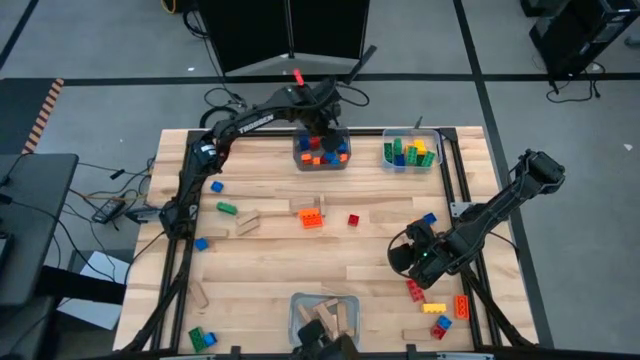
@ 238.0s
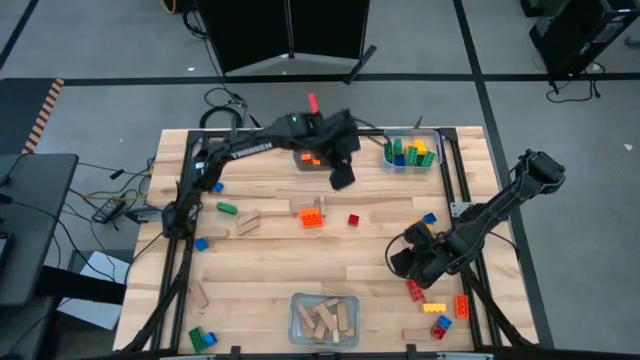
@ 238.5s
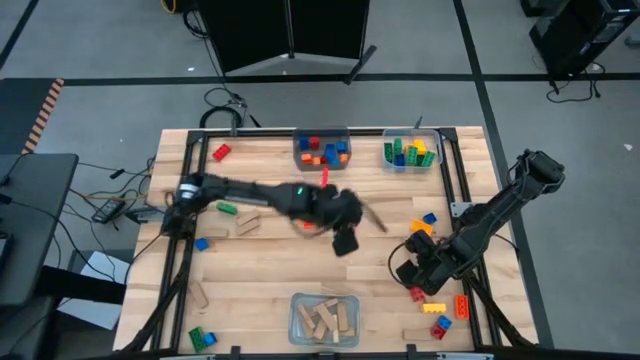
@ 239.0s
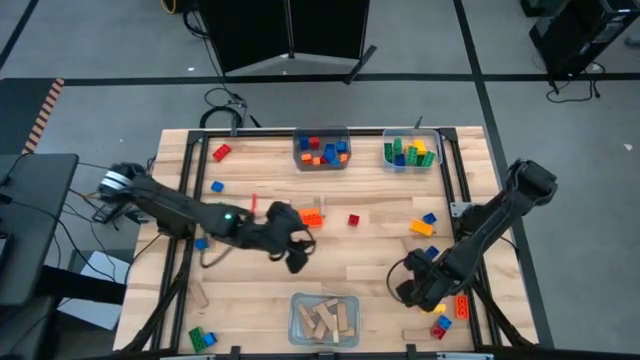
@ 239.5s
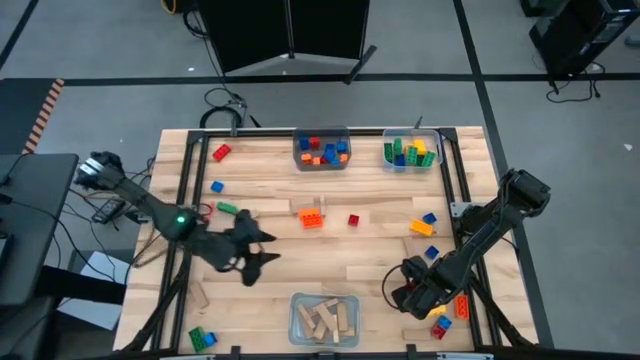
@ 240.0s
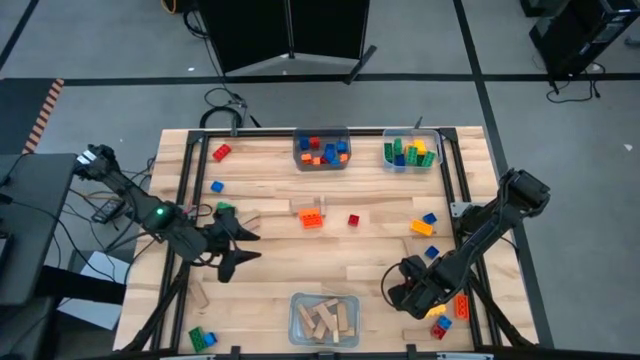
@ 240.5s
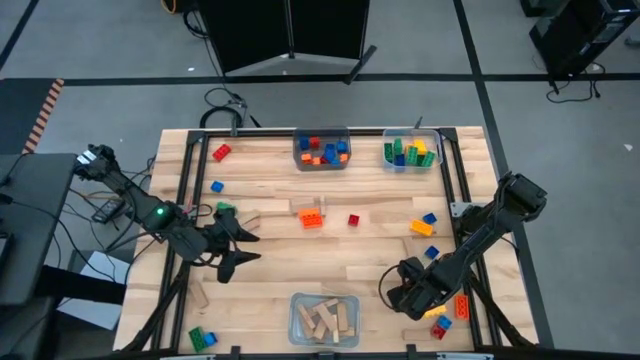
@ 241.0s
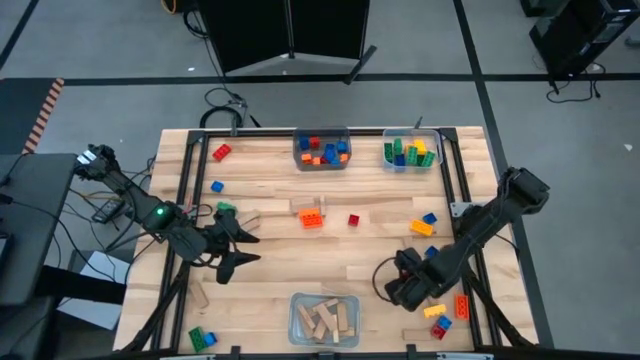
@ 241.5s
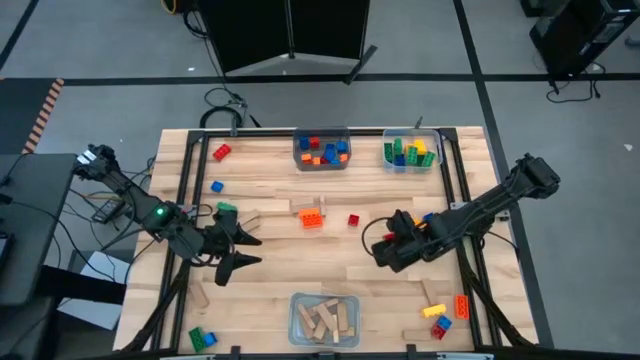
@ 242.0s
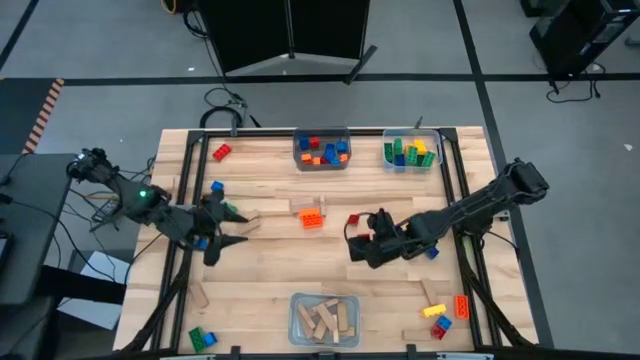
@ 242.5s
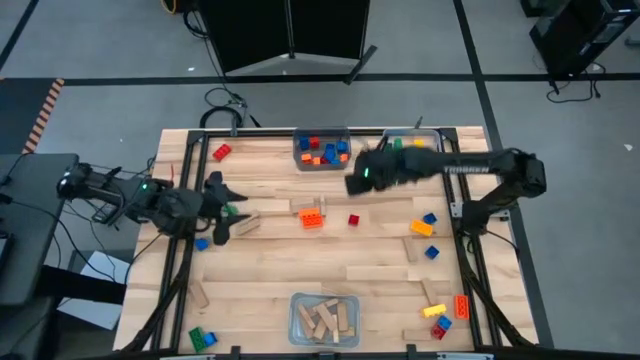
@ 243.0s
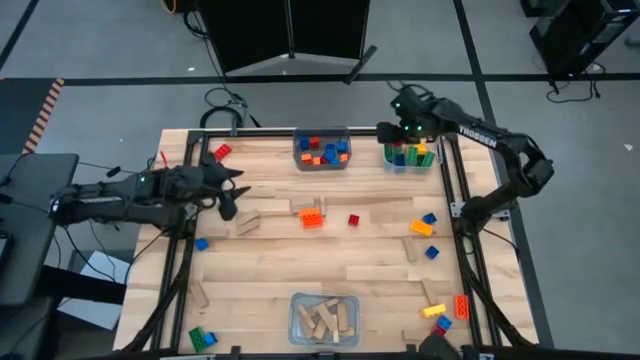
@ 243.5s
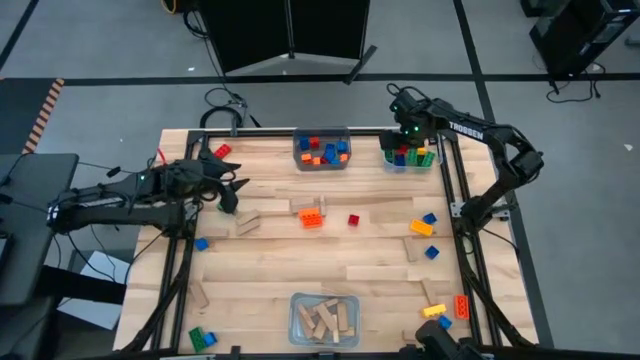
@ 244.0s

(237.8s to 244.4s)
Task: Sort blocks by size
Put the large red game piece into the transparent bin

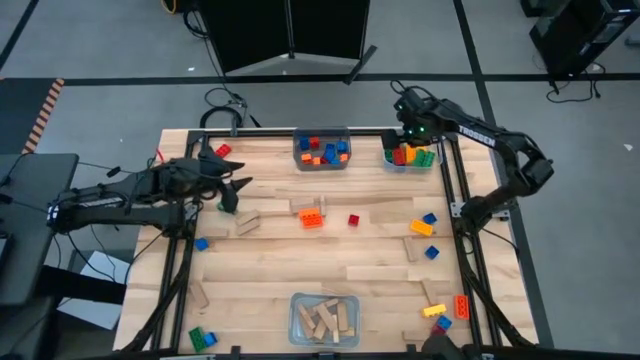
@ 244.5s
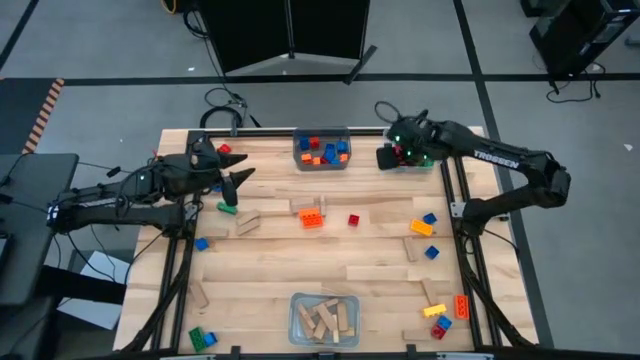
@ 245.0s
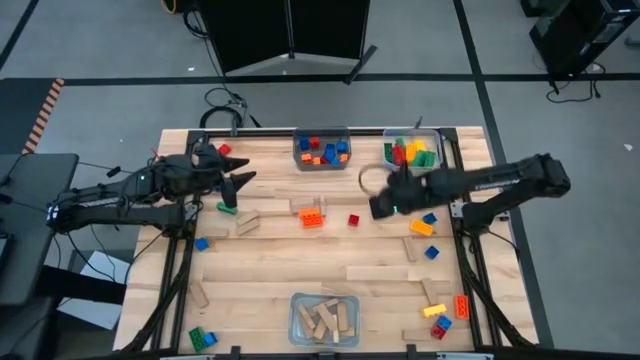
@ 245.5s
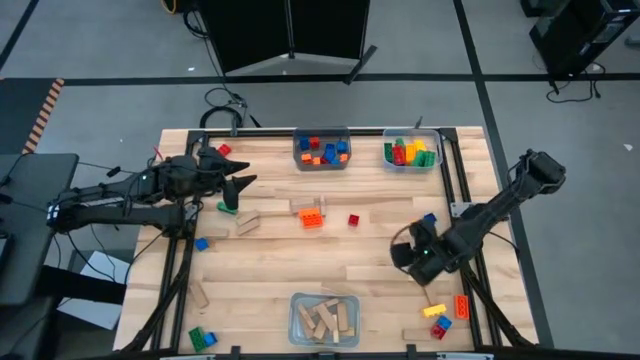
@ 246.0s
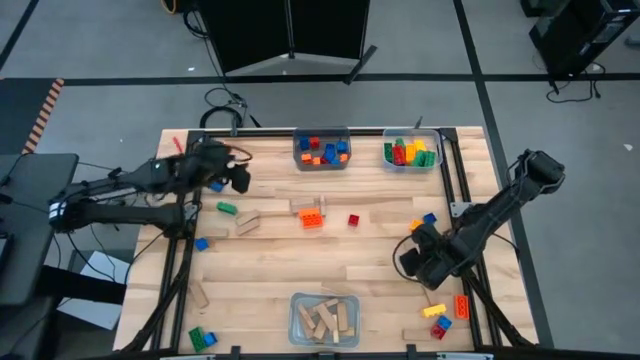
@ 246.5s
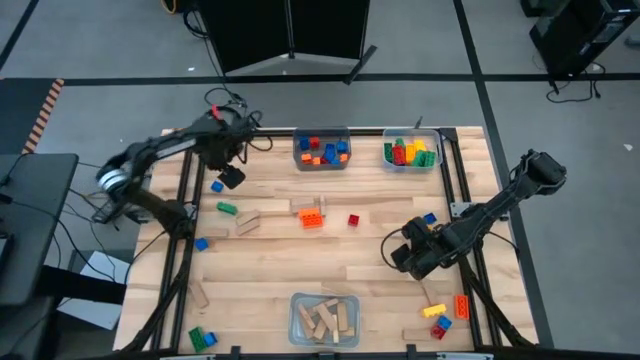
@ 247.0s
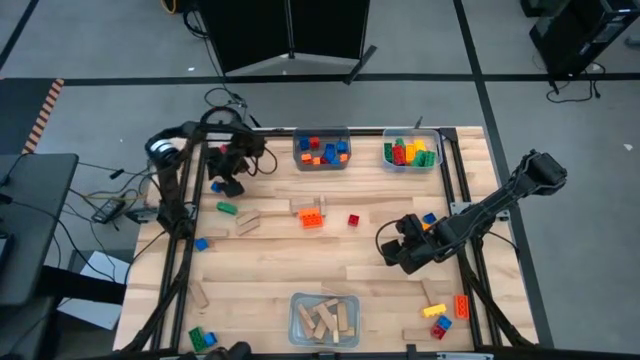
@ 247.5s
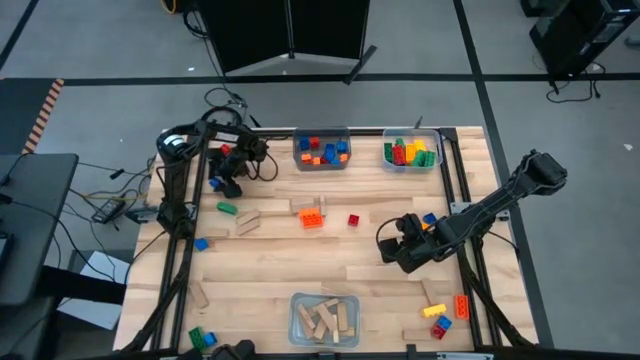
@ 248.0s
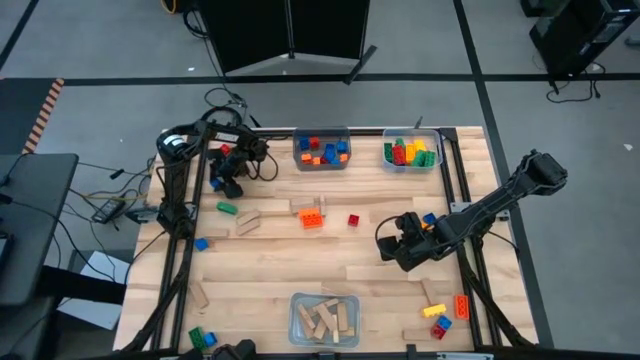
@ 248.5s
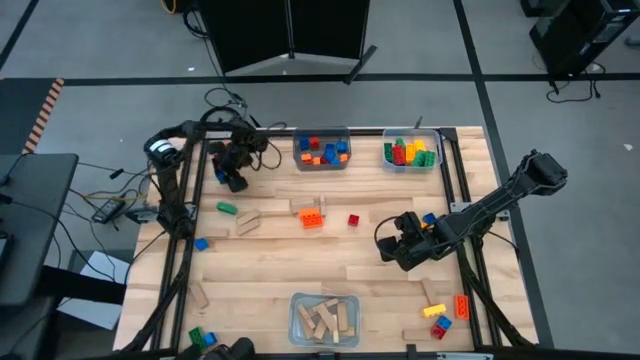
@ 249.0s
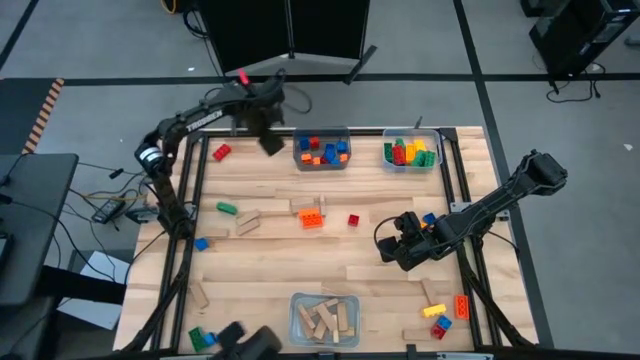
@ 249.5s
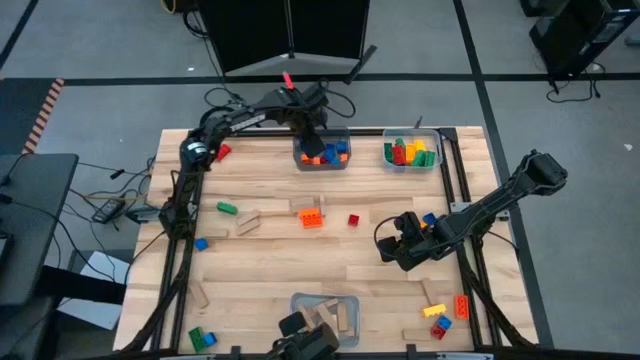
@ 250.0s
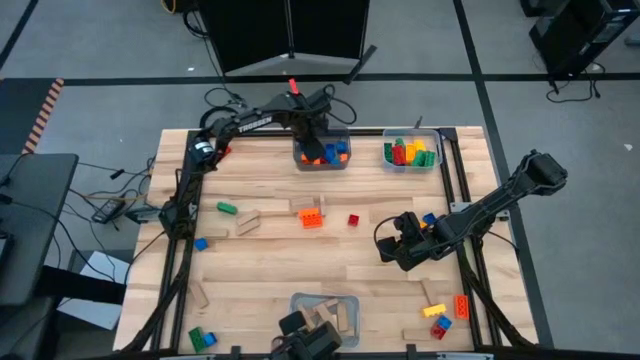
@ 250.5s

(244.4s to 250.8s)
Put the small blue game piece into the black bin

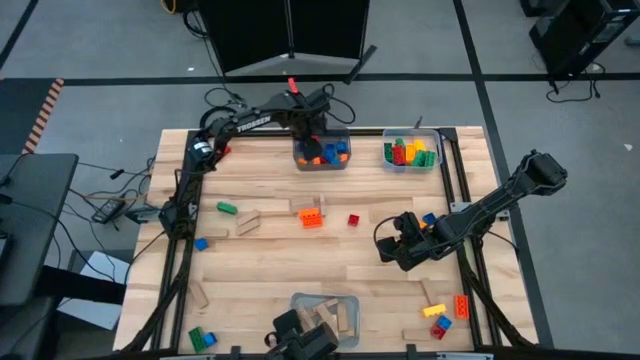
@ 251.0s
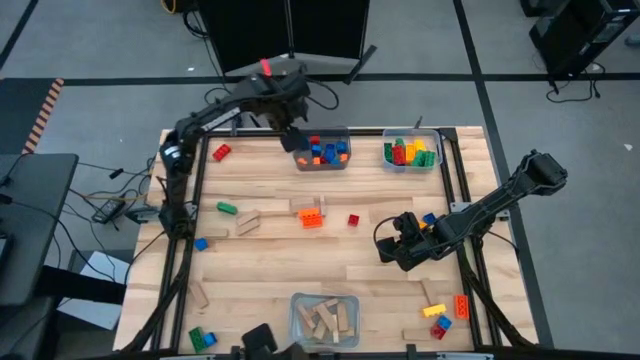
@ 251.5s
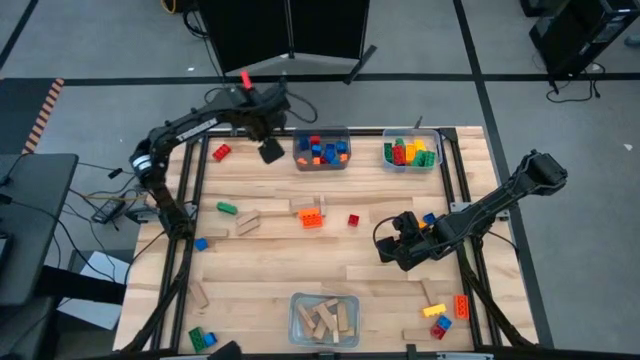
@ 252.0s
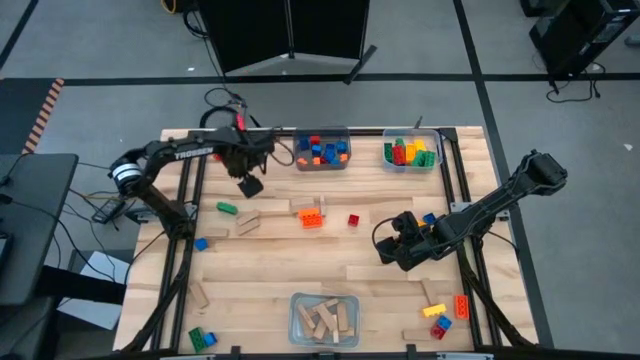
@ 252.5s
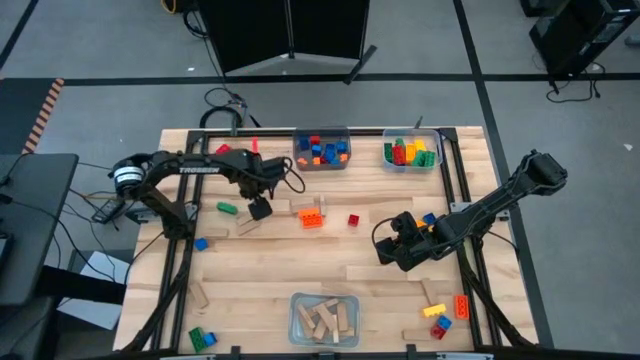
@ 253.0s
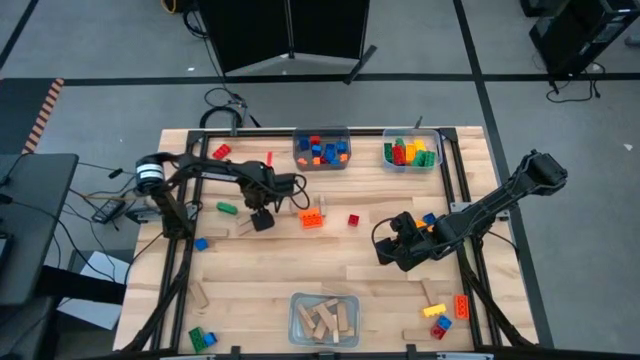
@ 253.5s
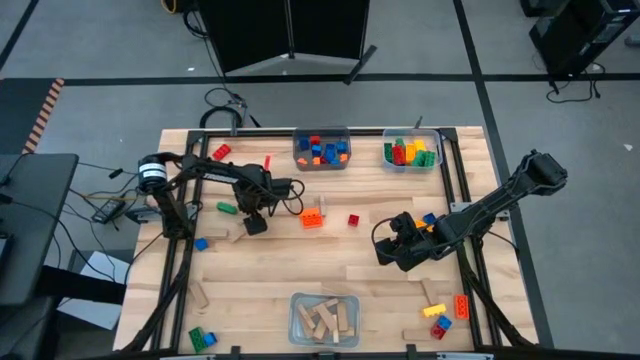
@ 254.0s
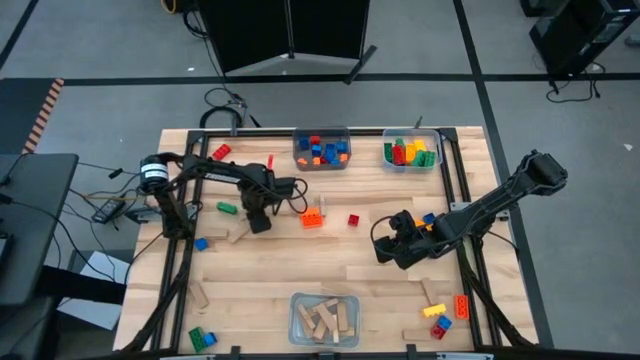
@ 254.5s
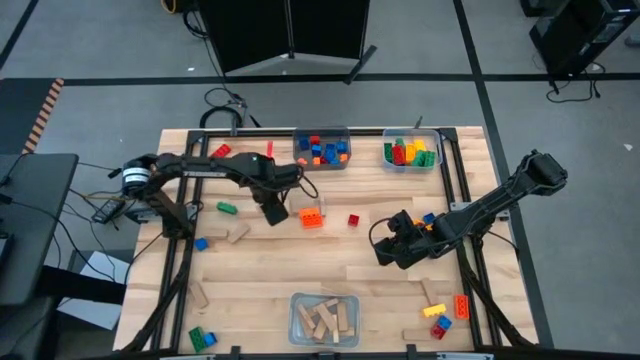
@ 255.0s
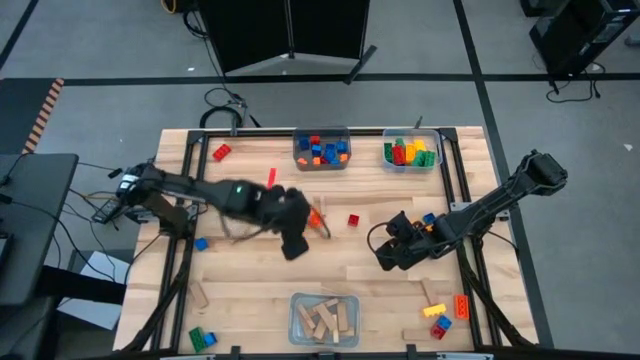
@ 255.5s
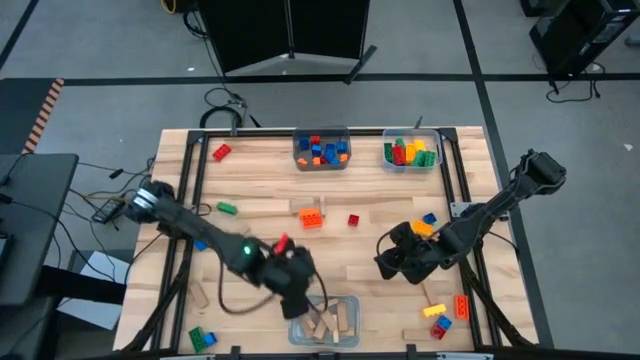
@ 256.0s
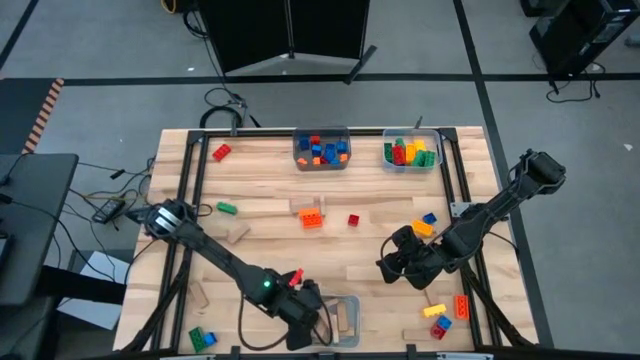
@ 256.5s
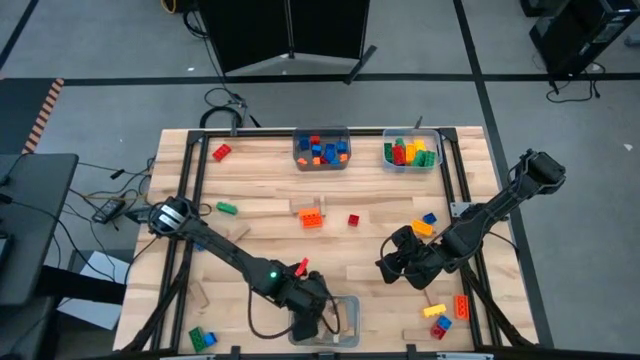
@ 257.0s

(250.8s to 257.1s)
Put the brown block into the gray bin

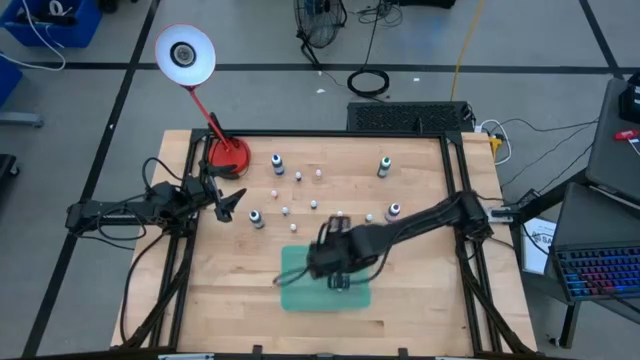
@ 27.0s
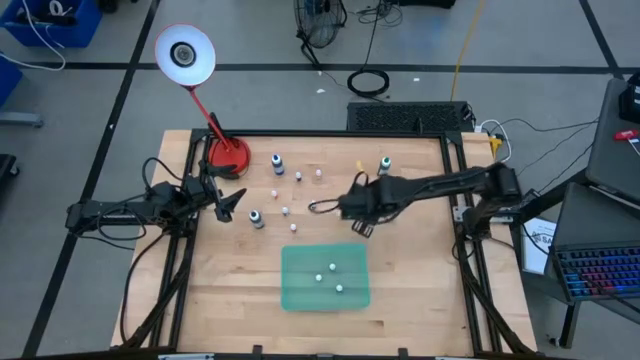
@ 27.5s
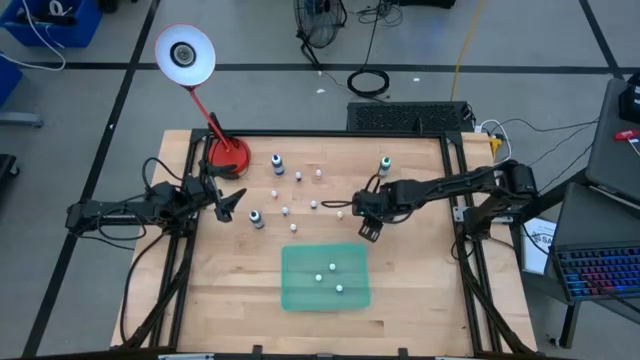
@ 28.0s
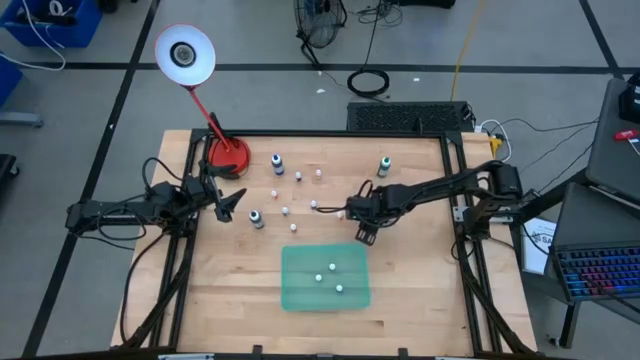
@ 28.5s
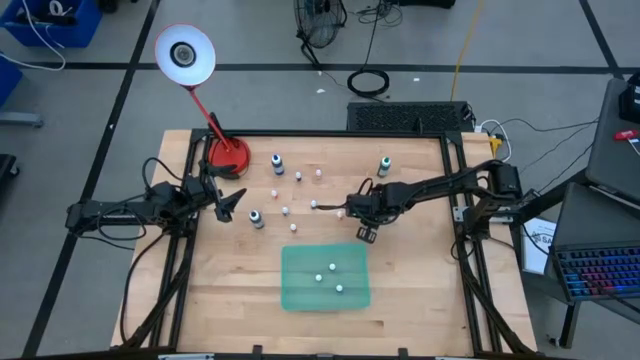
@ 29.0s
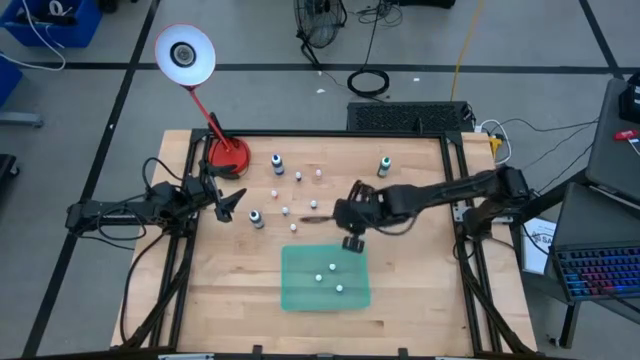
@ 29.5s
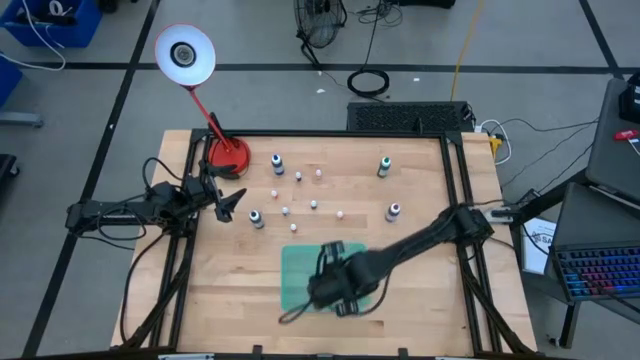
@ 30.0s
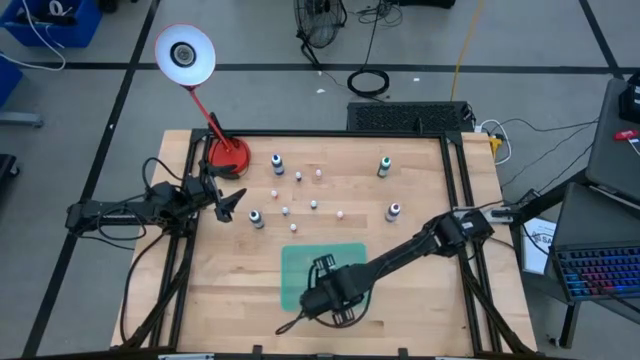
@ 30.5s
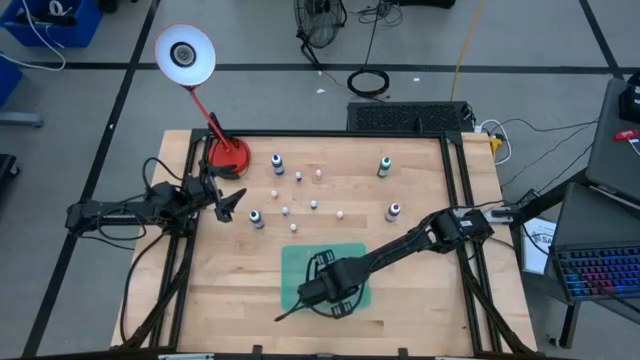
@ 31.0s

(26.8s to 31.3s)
Task: Pick & Place food coloring
Put the bottom right small black food coloring bottle into the blue bin
